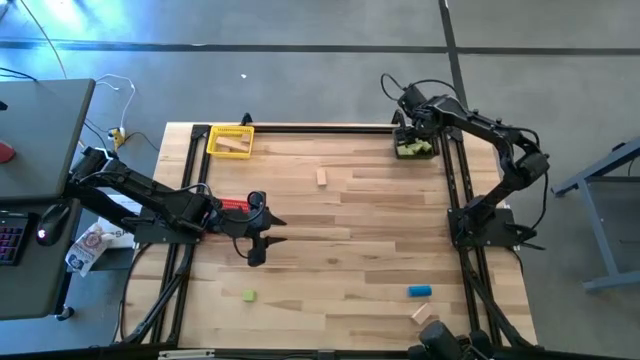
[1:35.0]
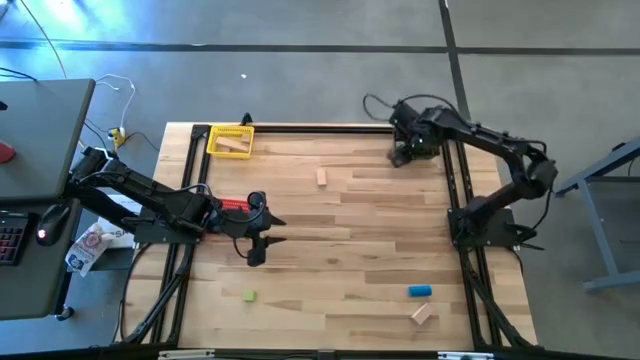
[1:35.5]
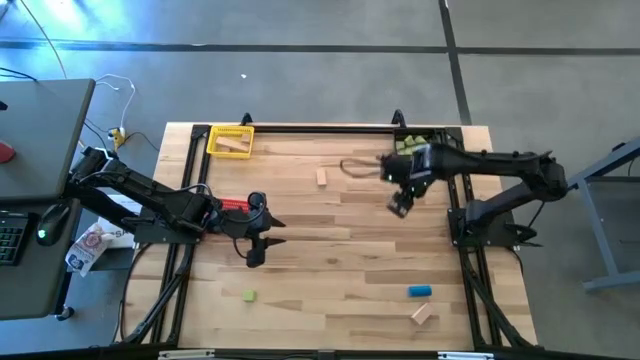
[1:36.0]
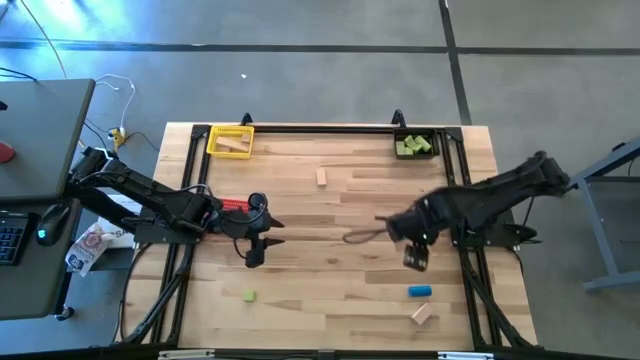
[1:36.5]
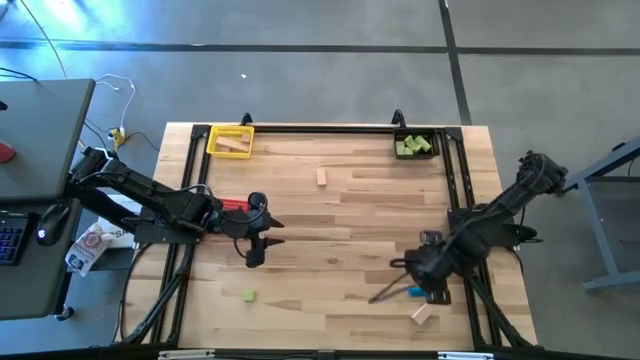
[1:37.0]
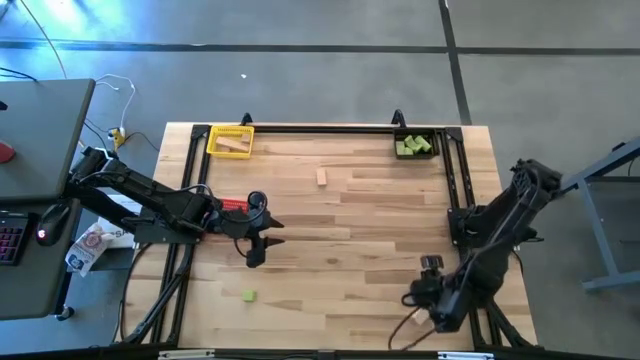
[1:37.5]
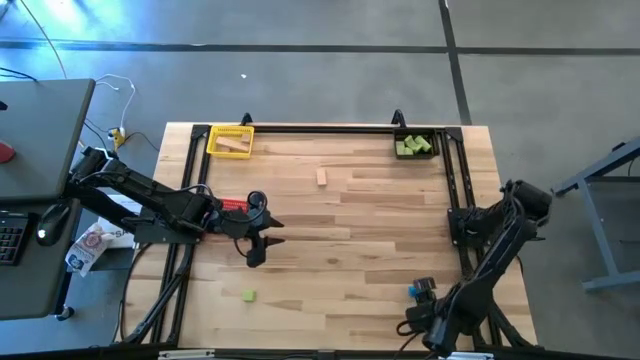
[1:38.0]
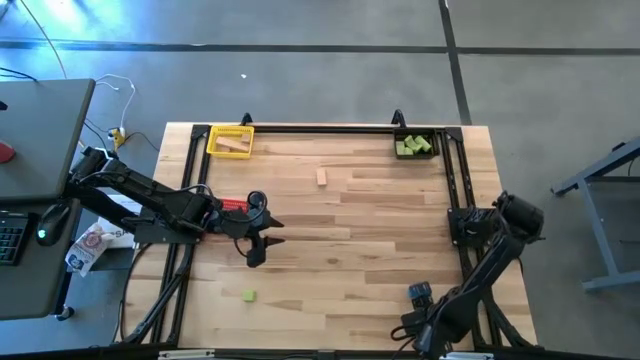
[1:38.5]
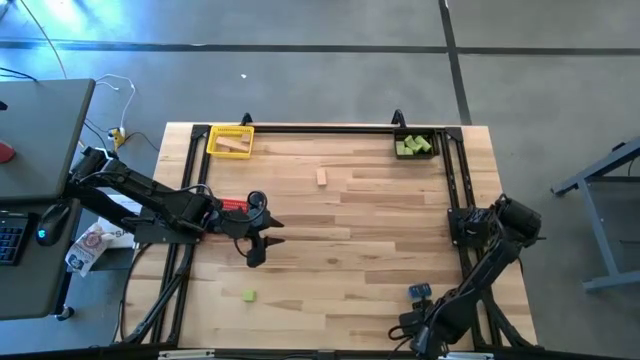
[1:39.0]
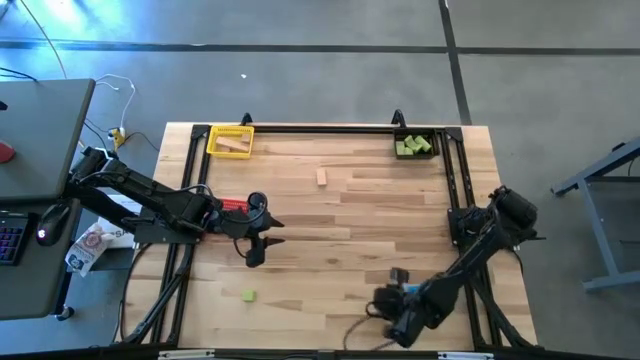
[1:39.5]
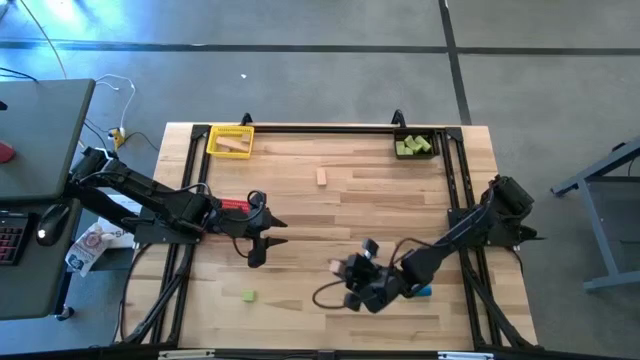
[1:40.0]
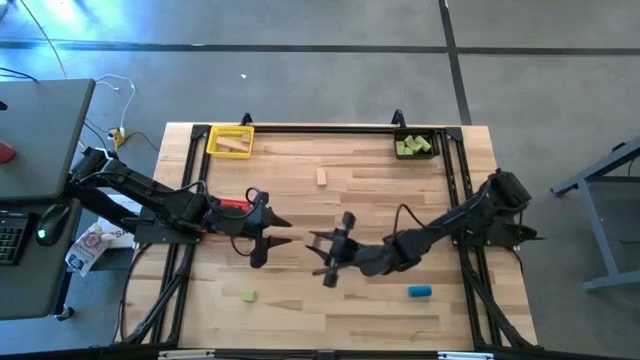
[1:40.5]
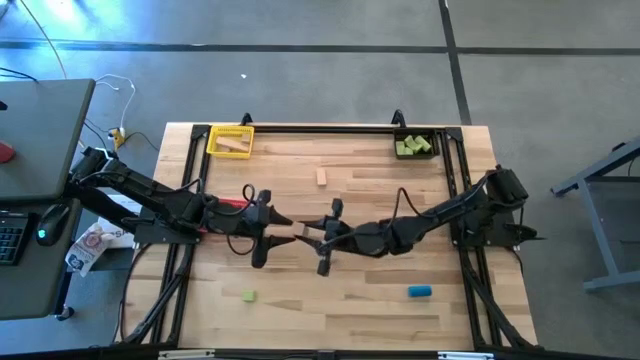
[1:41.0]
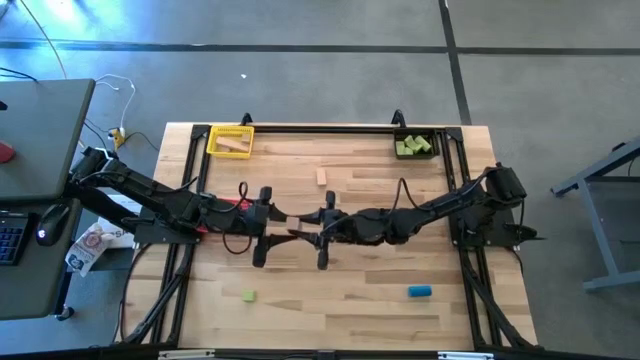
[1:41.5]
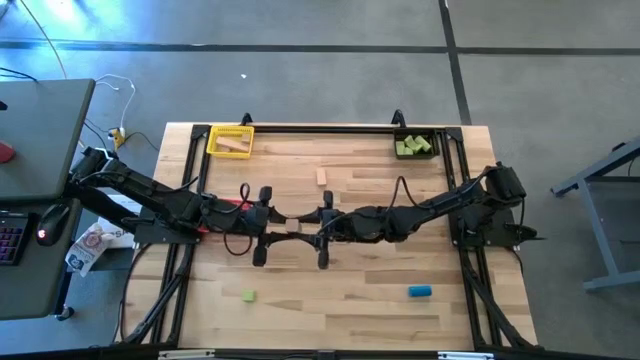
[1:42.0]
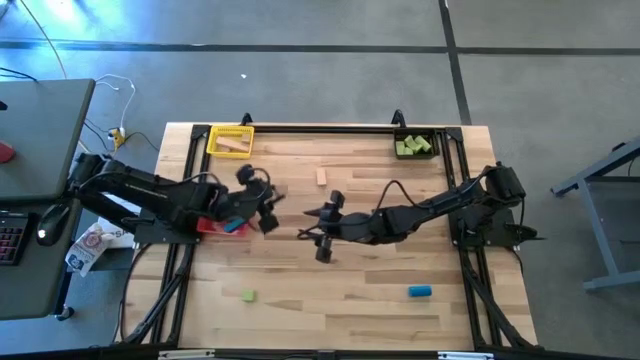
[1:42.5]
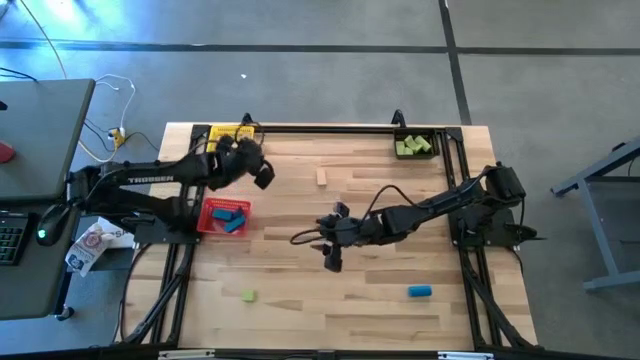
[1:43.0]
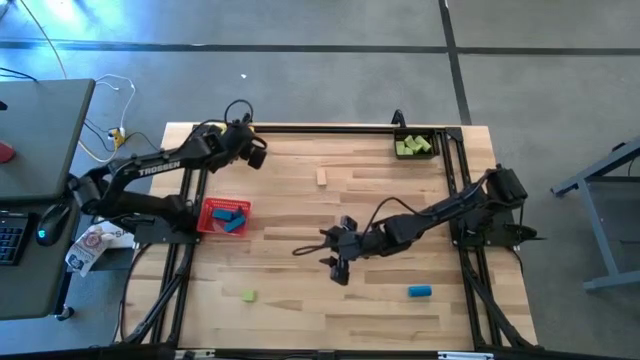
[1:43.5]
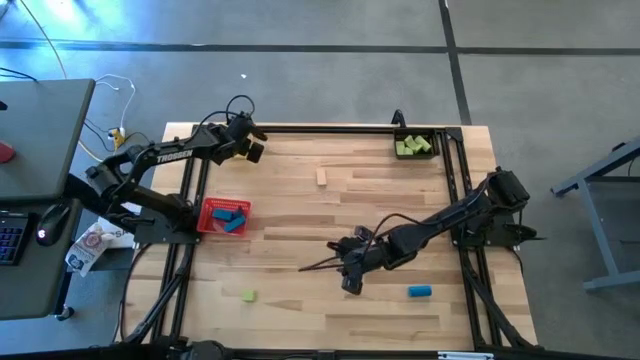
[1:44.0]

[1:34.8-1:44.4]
Task: Sort & place blocks by color
Put the brown block into the yellow bin

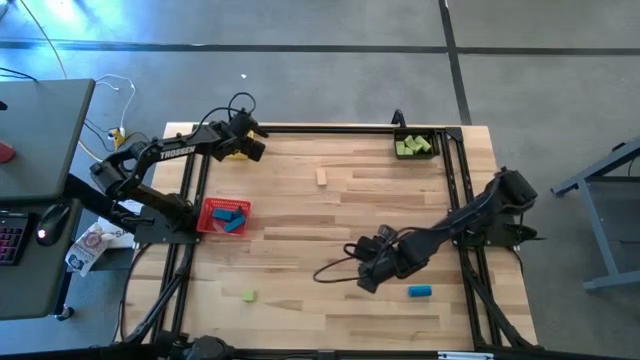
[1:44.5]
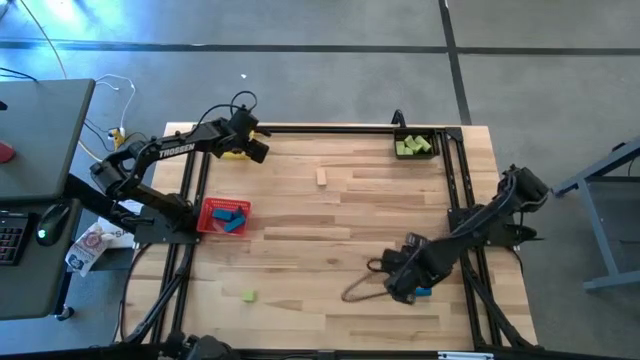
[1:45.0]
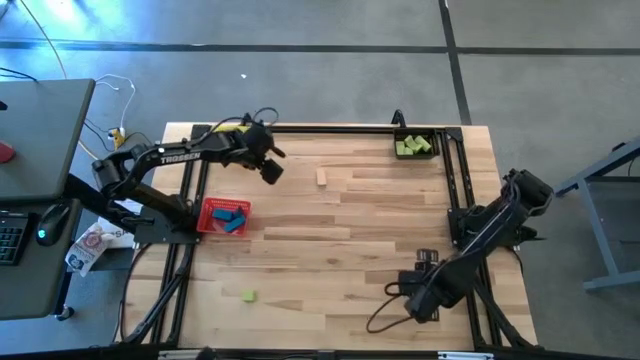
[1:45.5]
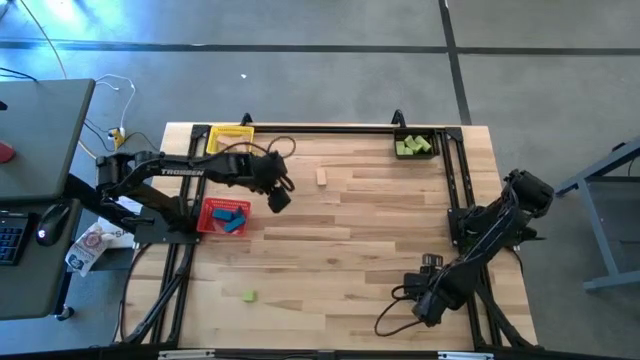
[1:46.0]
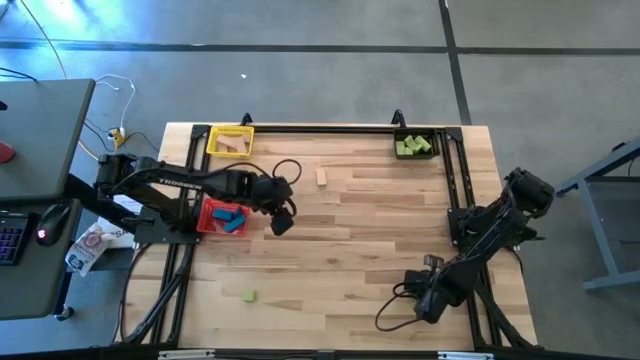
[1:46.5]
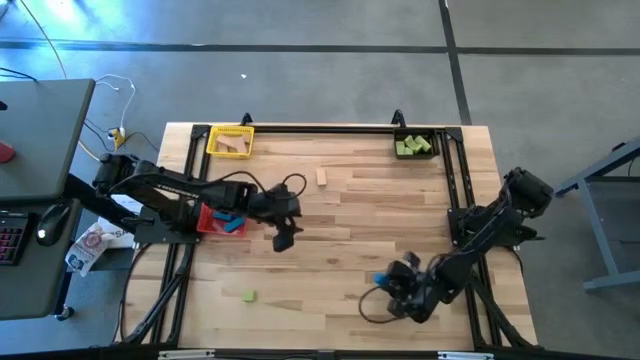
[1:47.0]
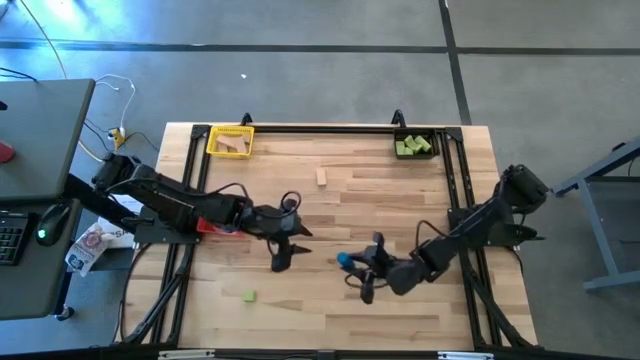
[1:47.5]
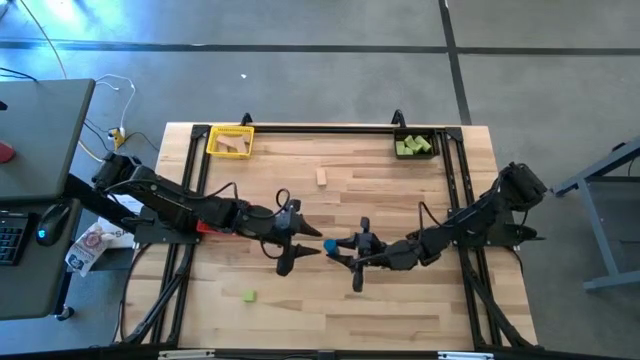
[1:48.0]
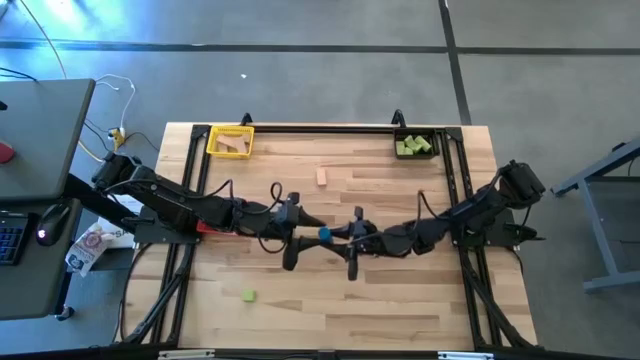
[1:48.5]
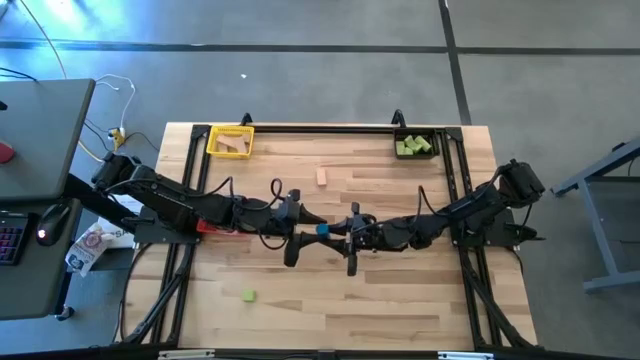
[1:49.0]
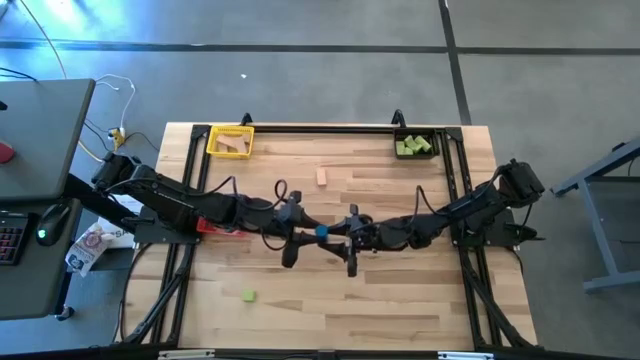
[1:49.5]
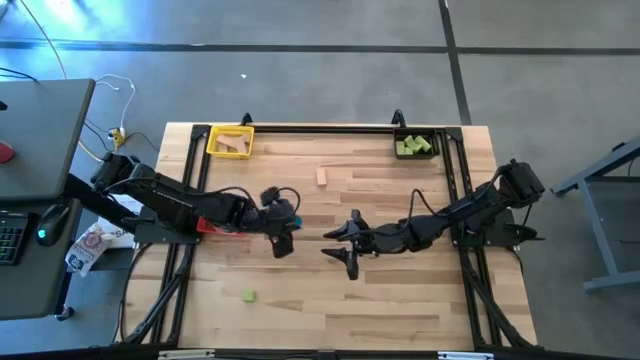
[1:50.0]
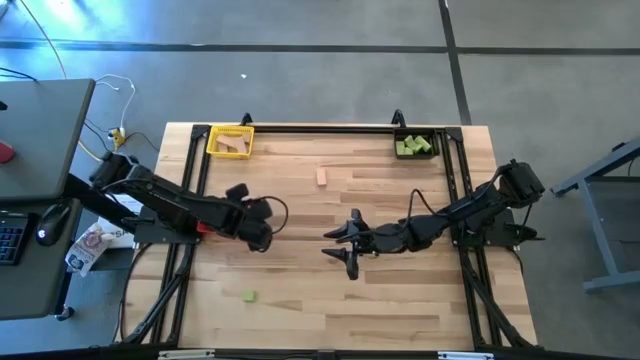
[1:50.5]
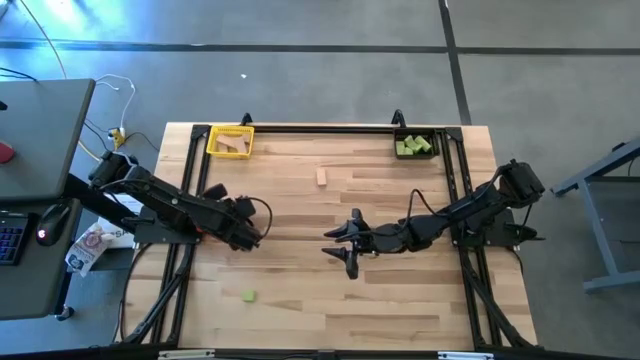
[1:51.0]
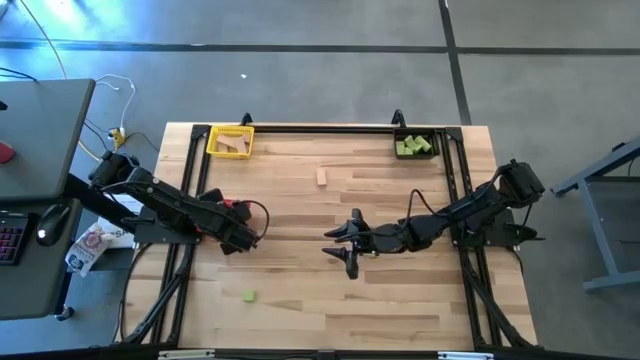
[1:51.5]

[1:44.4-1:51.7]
Put the blue block into the red bin

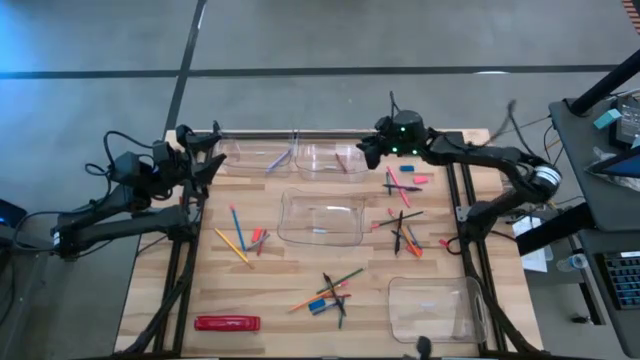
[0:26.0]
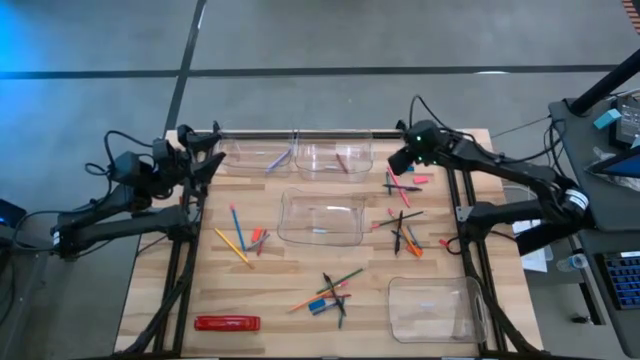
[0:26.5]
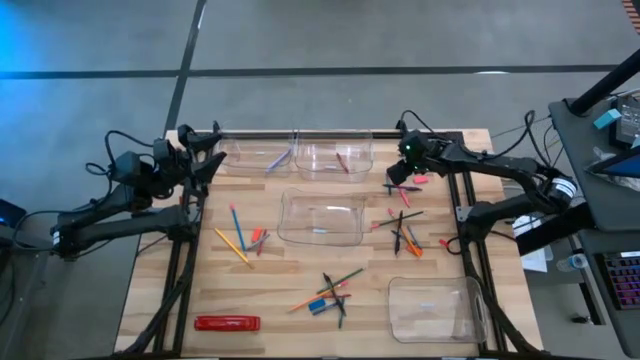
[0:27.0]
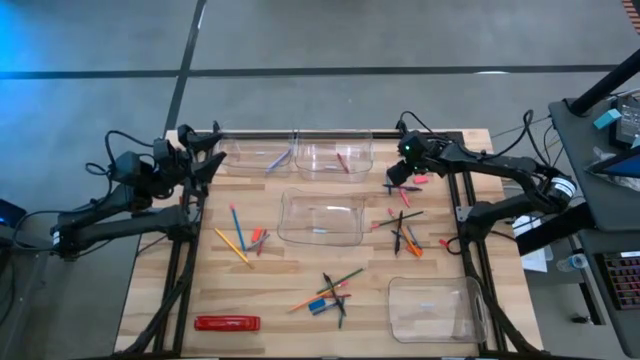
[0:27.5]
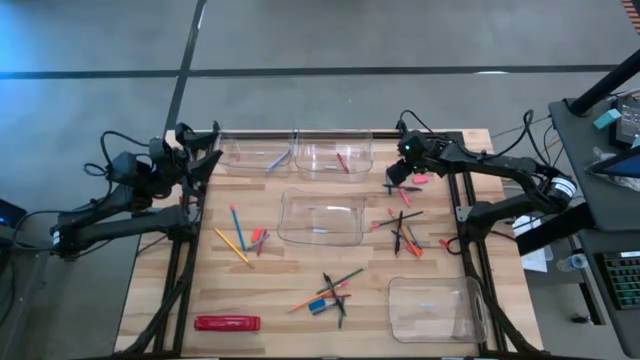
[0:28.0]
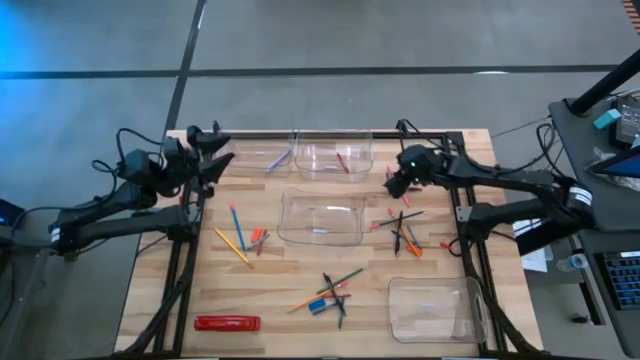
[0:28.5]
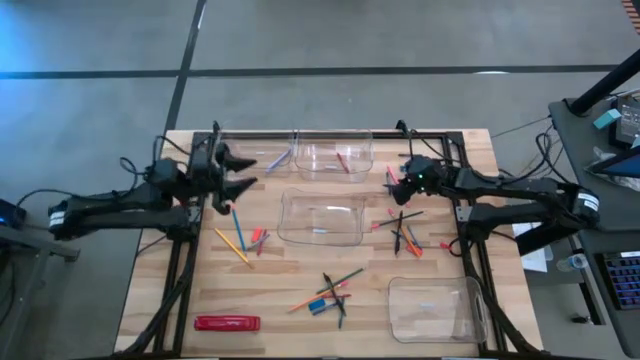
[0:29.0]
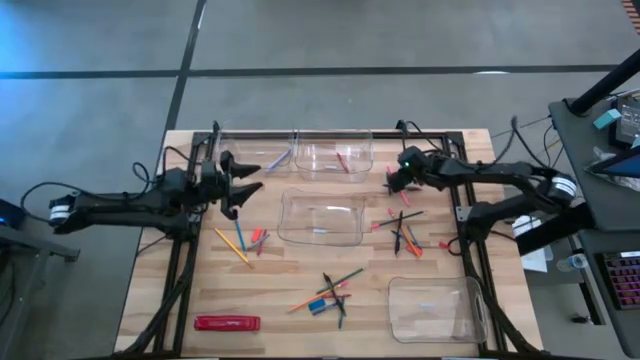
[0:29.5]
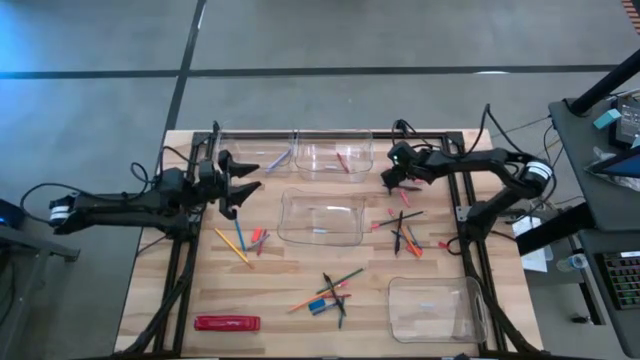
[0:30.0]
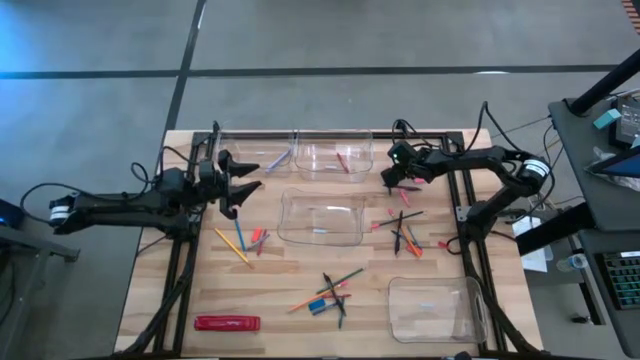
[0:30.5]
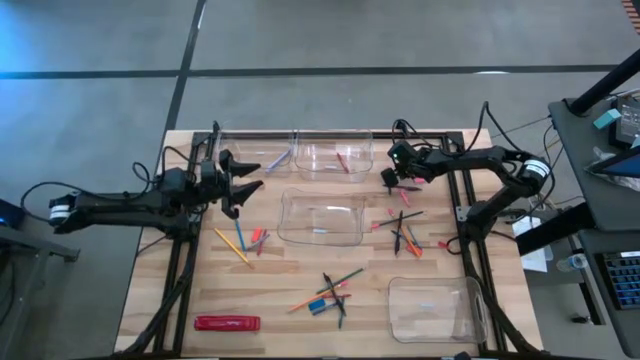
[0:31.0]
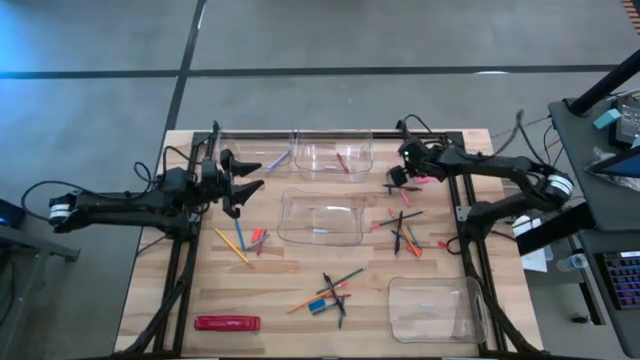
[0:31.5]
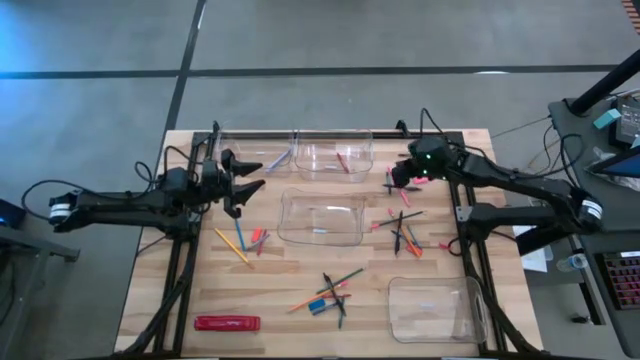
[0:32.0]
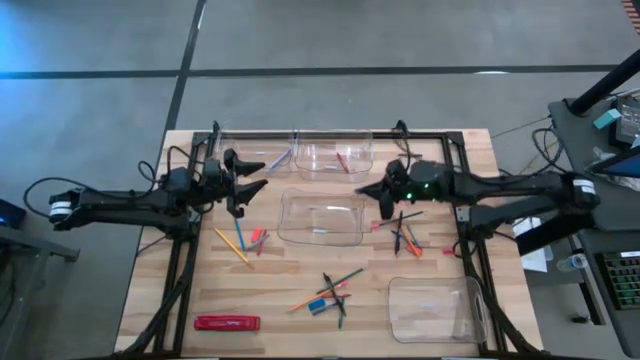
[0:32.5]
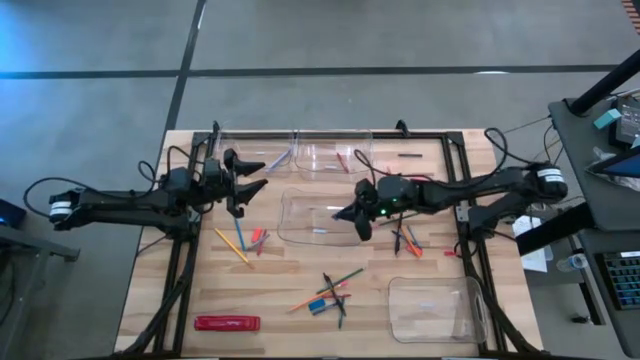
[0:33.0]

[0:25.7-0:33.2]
Task: Sort crayons/erasers/pens/pencils in bins
Put the blue eraser into the middle transparent bin
